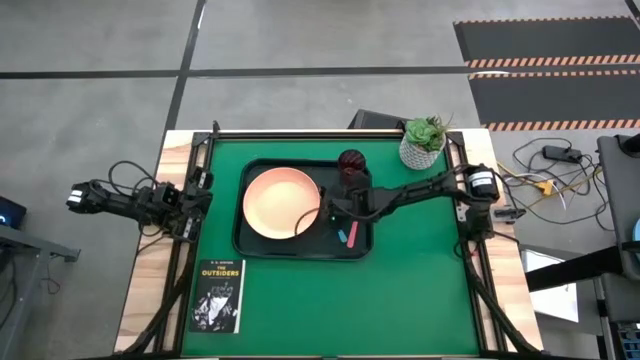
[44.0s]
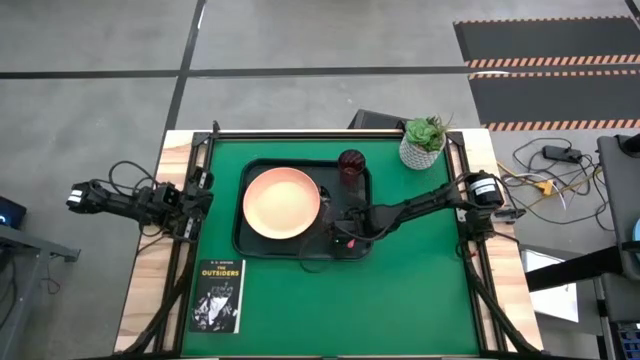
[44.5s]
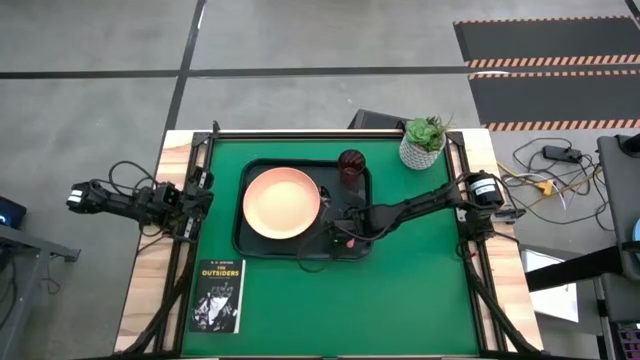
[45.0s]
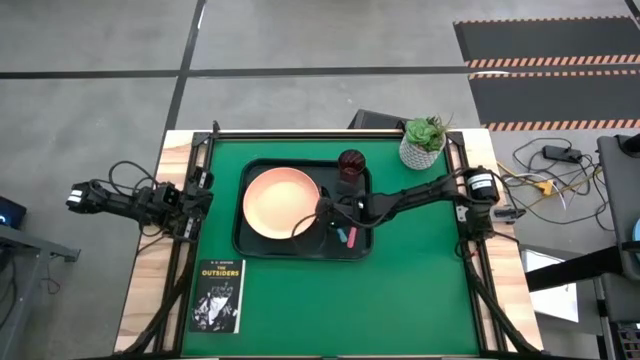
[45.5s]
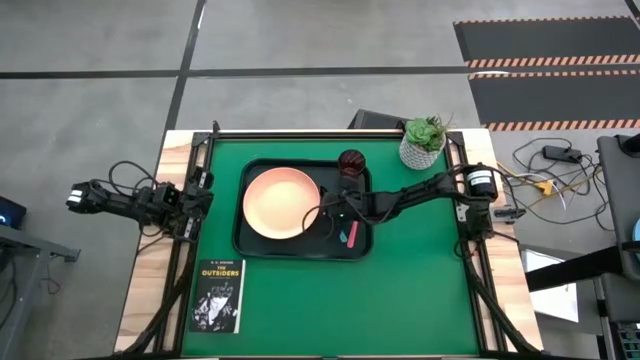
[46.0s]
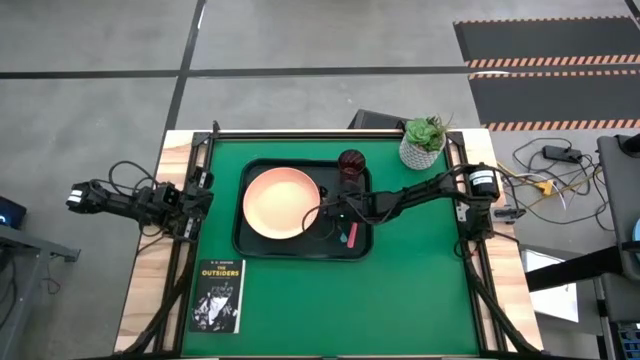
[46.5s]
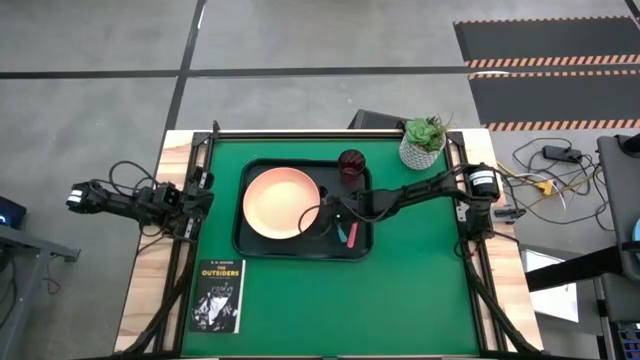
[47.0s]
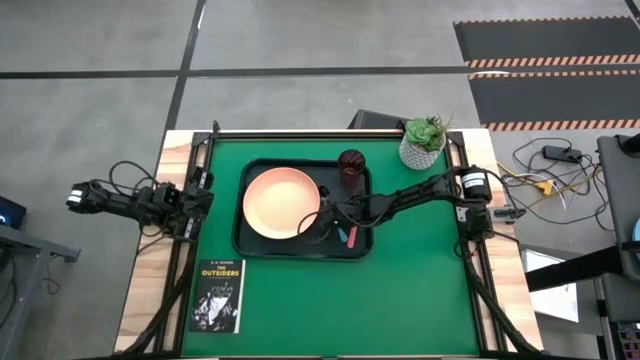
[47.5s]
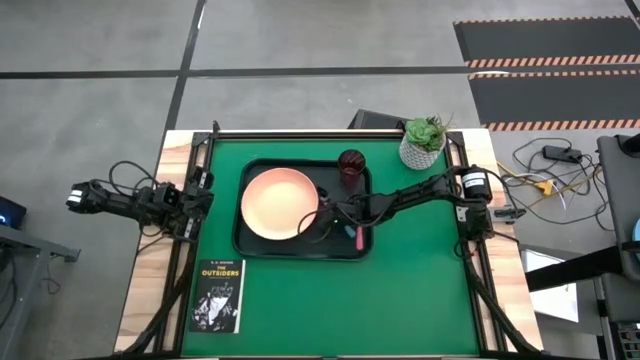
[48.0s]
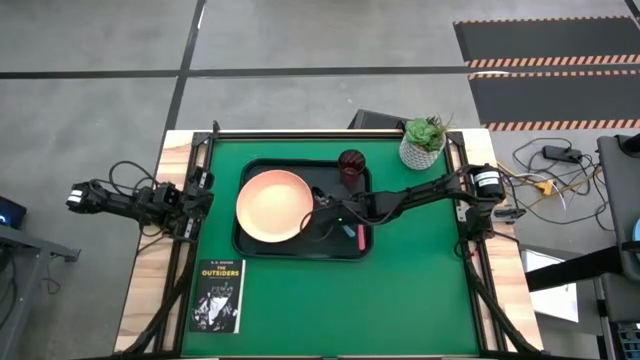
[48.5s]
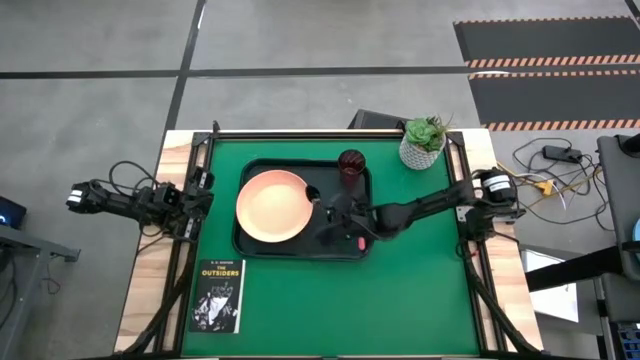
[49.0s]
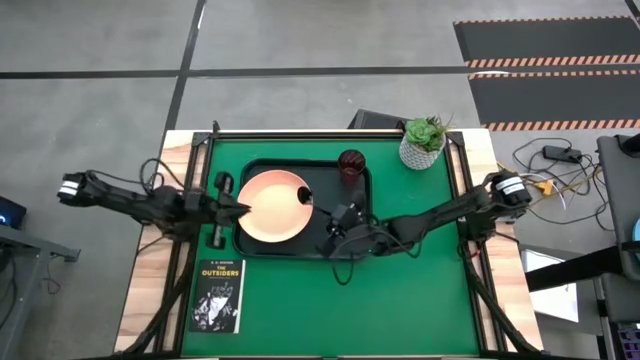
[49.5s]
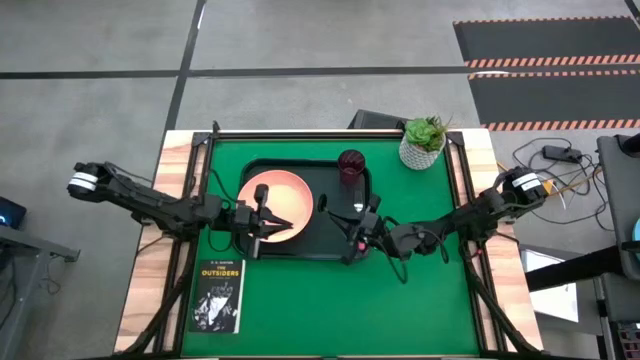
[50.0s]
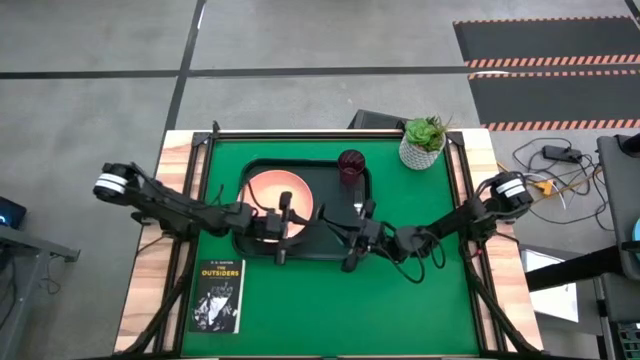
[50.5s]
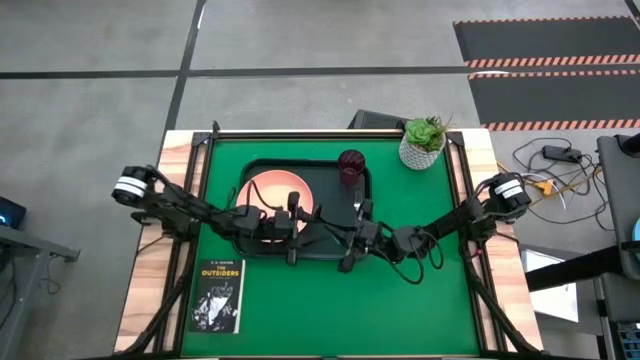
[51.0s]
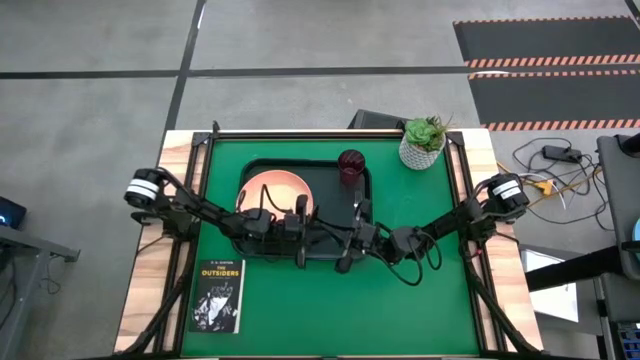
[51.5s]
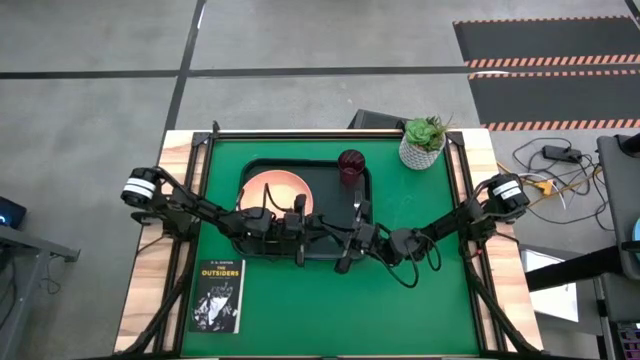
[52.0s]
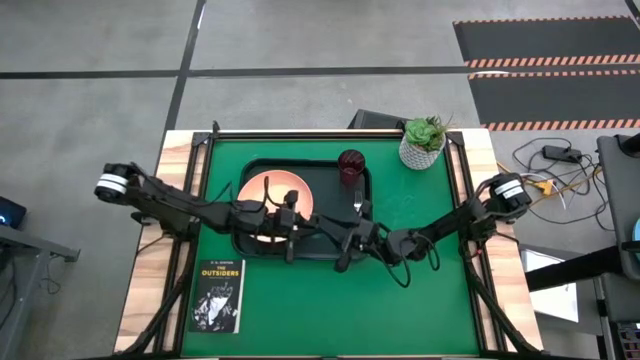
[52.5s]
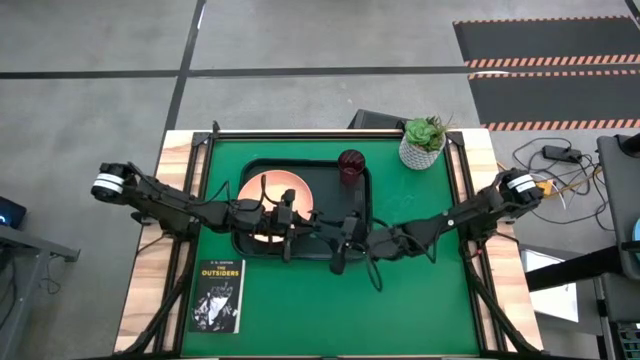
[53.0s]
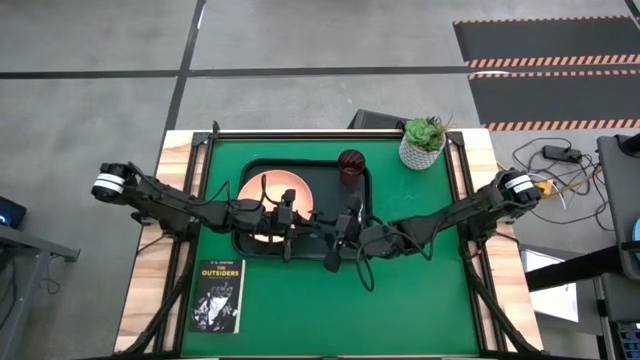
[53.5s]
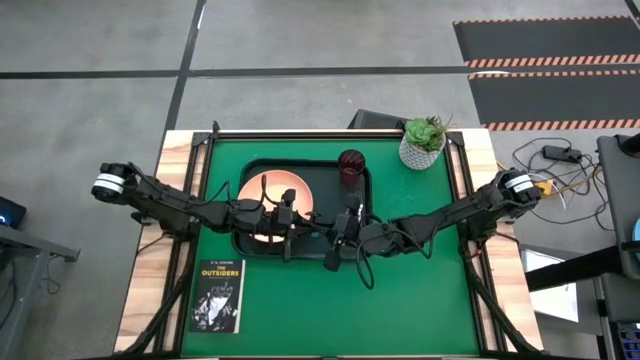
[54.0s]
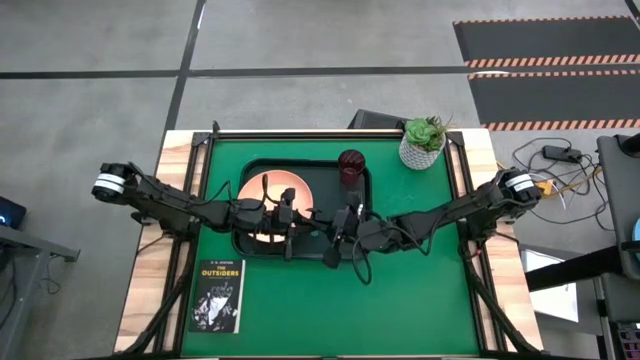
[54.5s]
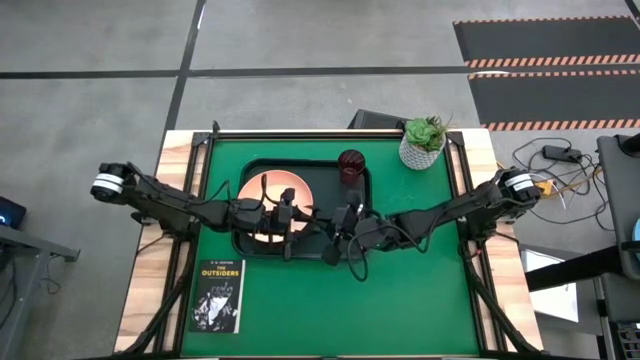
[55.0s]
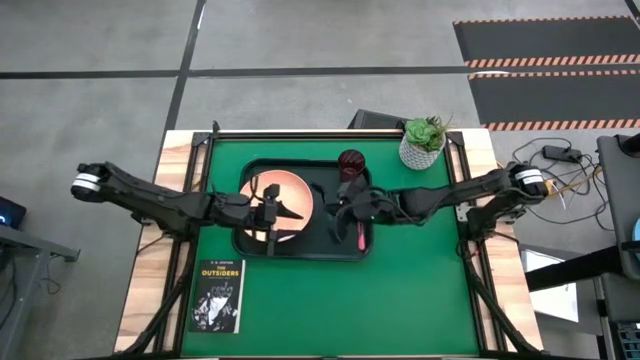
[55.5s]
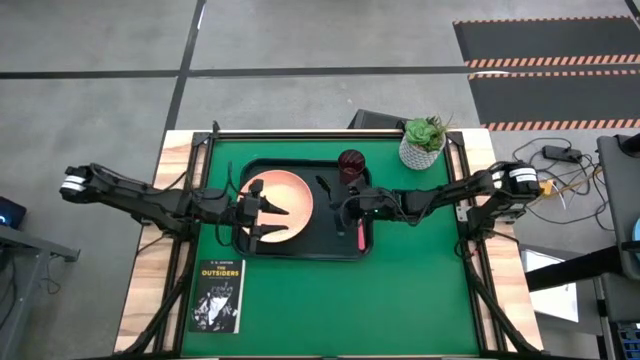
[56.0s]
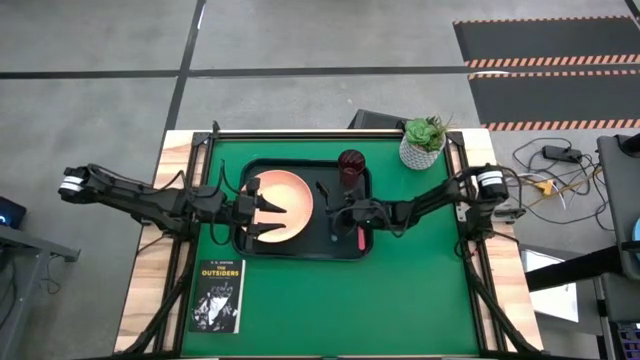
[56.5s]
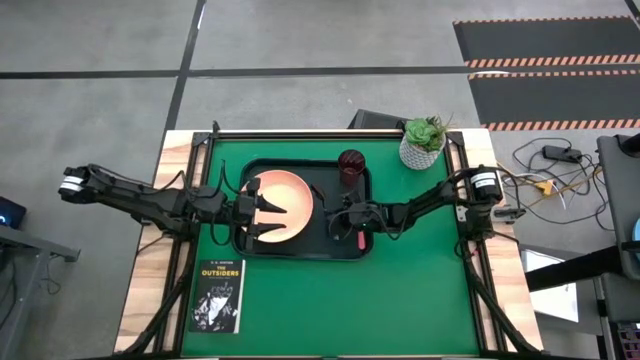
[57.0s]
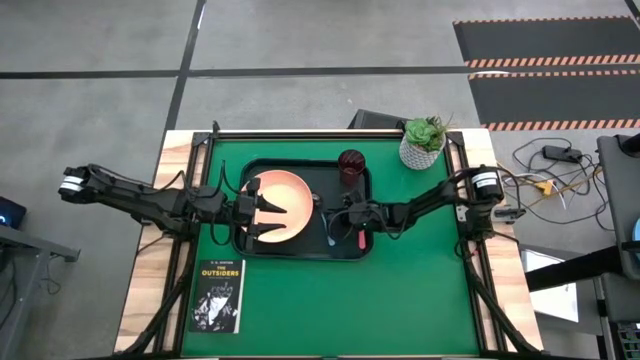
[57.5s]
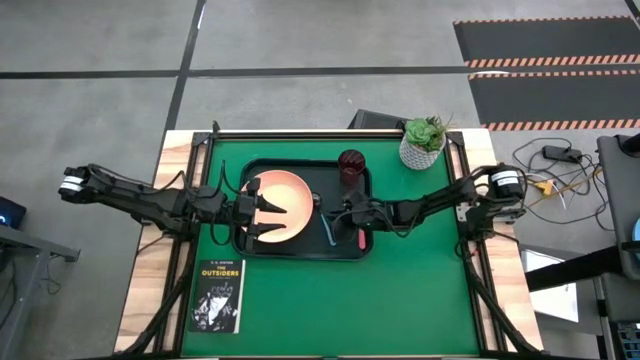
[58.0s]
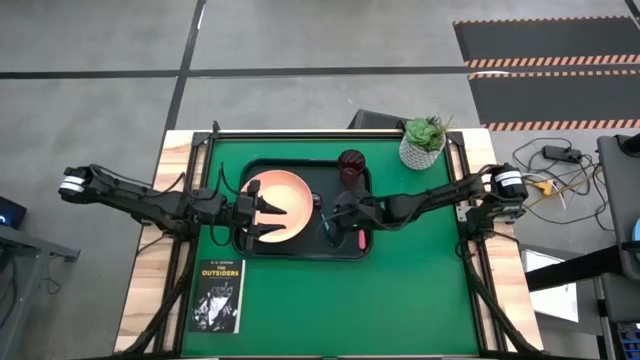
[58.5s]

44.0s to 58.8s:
Task: Pick and place plate/cup/fork/spoon on tray
Adjust the blue spoon on the black tray

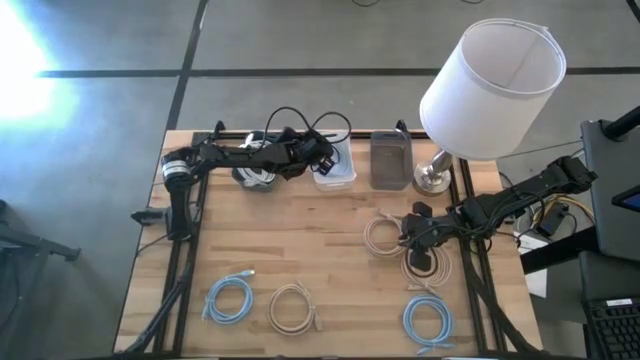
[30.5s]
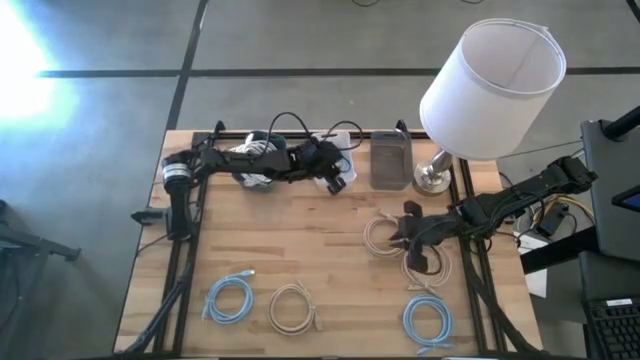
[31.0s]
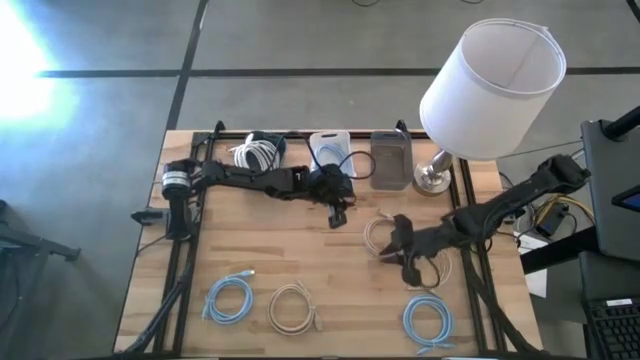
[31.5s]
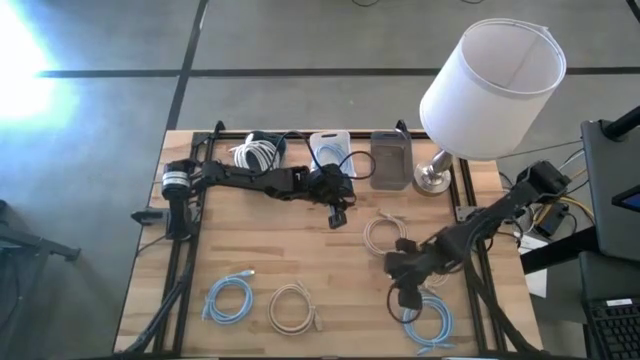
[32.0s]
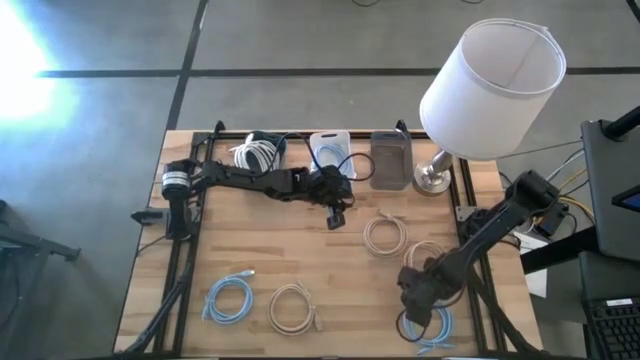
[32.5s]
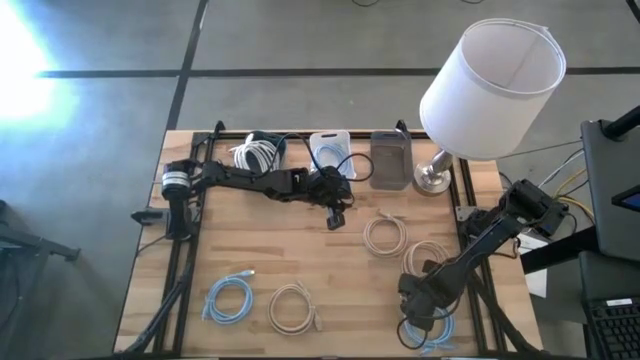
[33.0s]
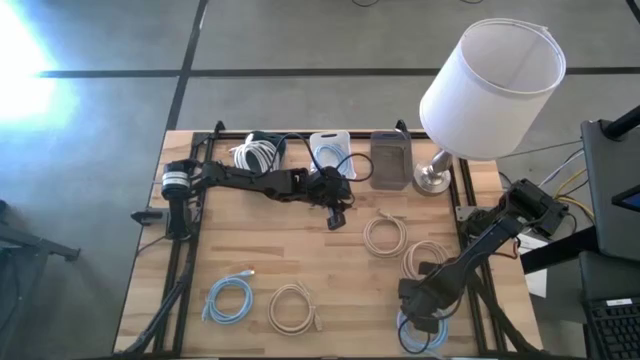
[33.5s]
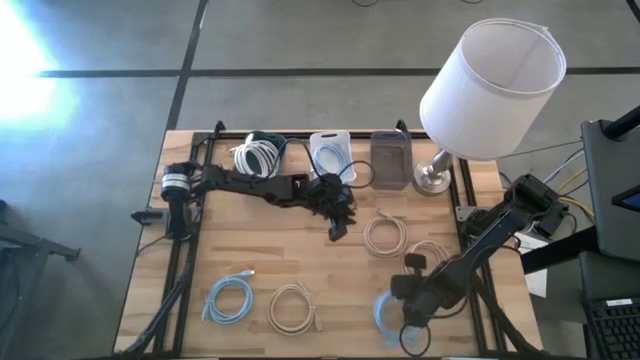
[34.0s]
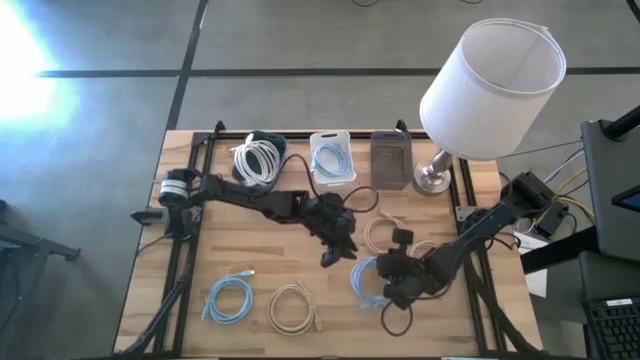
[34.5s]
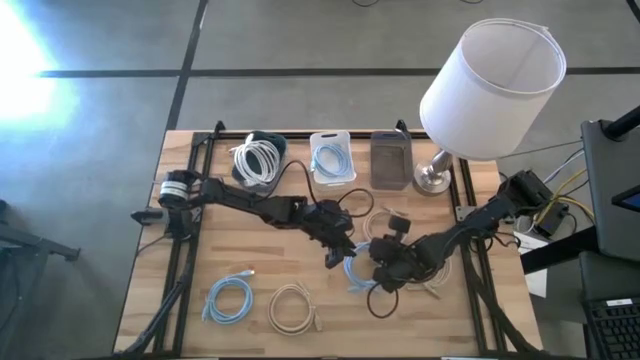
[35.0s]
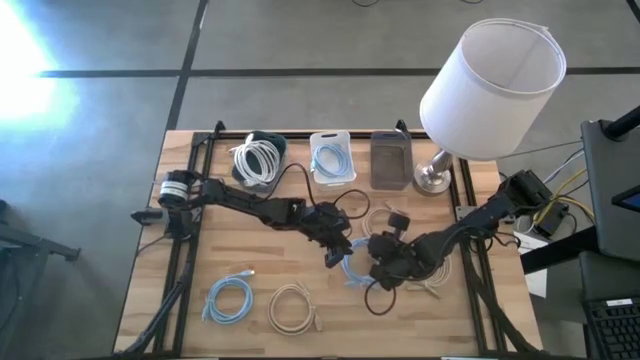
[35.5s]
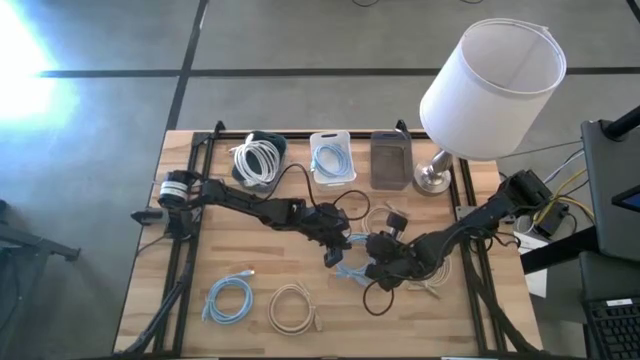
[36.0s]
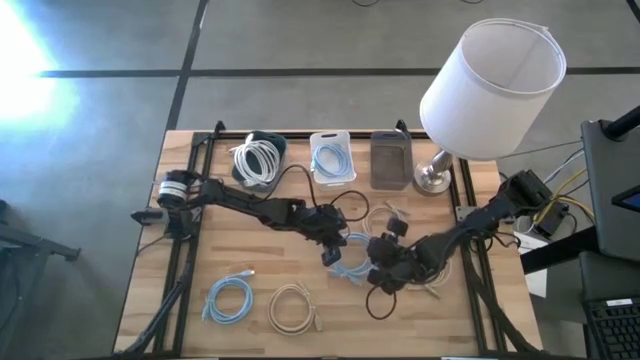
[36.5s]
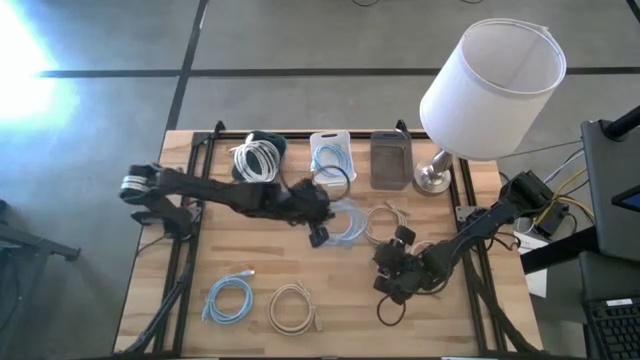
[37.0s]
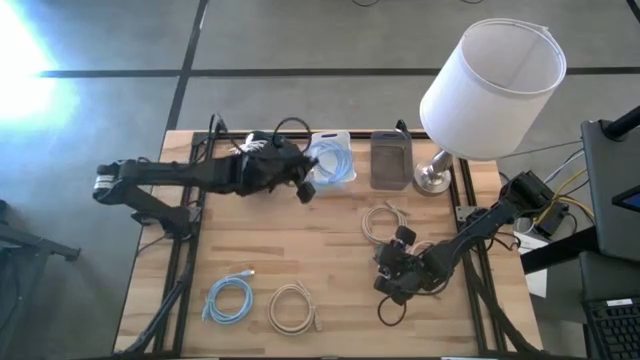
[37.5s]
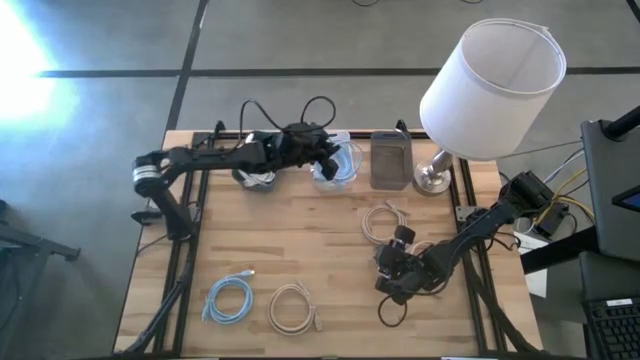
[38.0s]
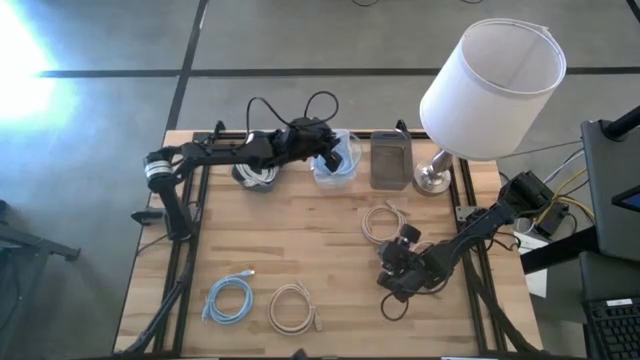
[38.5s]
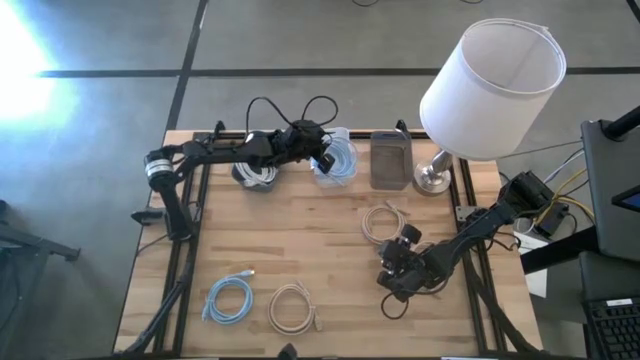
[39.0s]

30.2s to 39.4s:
Task: Sort HDMI cables
Put the right blue HDMI cable into the white bin
